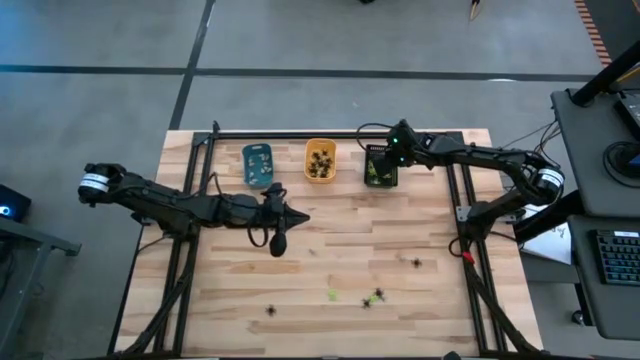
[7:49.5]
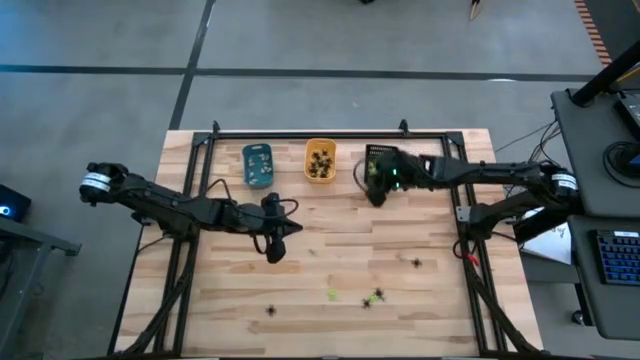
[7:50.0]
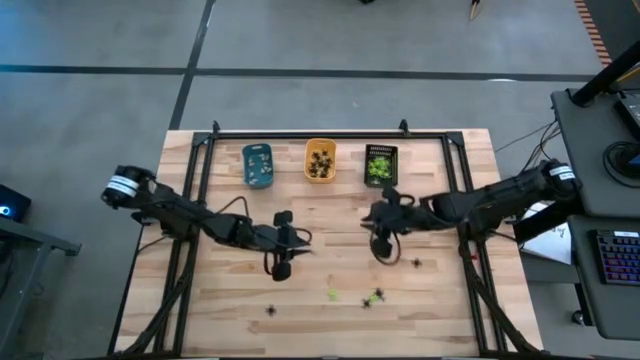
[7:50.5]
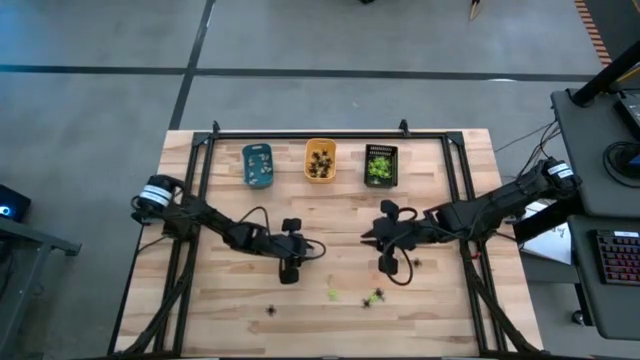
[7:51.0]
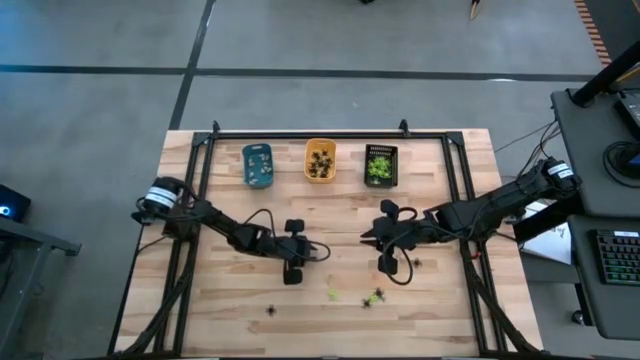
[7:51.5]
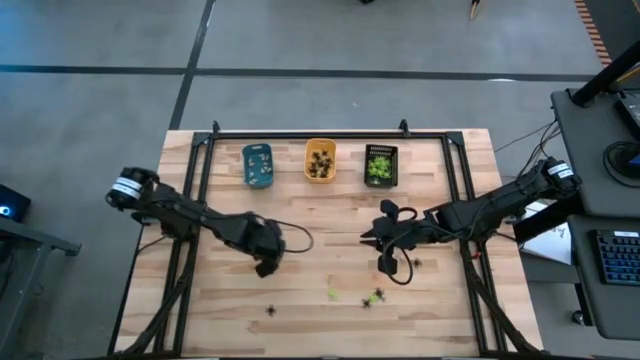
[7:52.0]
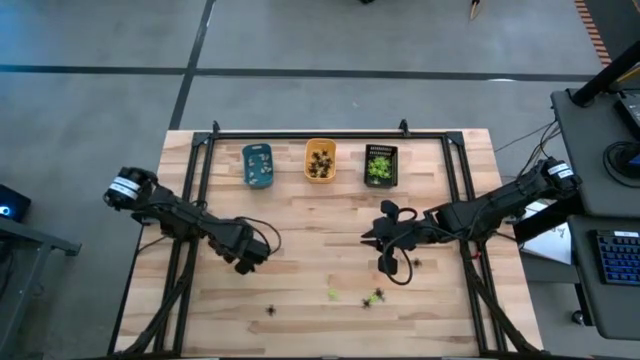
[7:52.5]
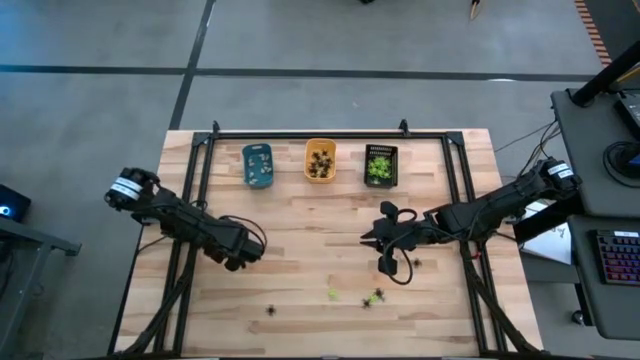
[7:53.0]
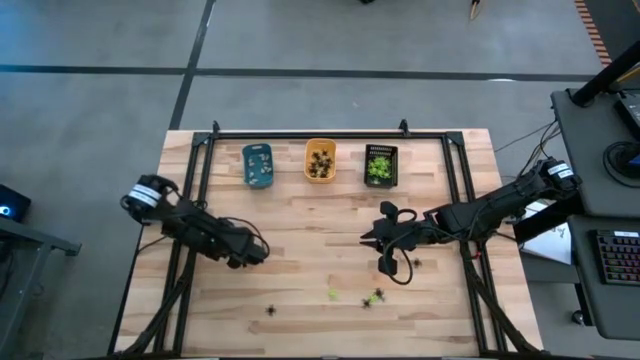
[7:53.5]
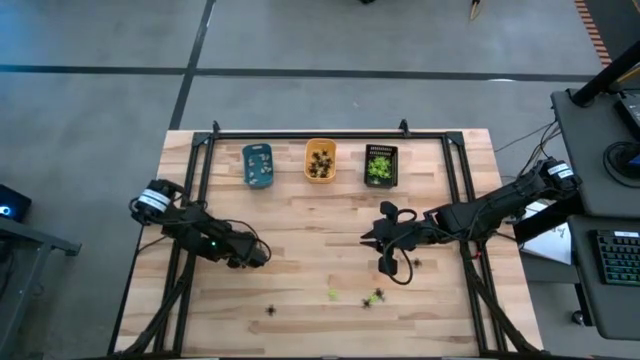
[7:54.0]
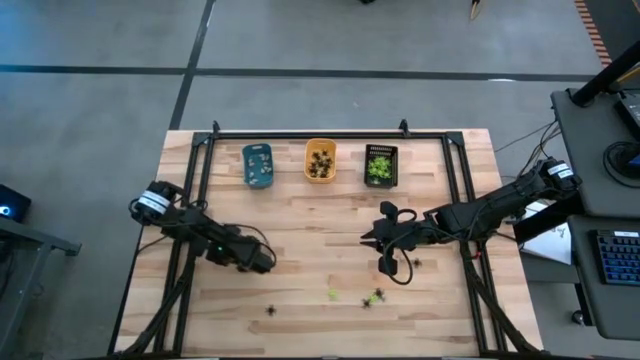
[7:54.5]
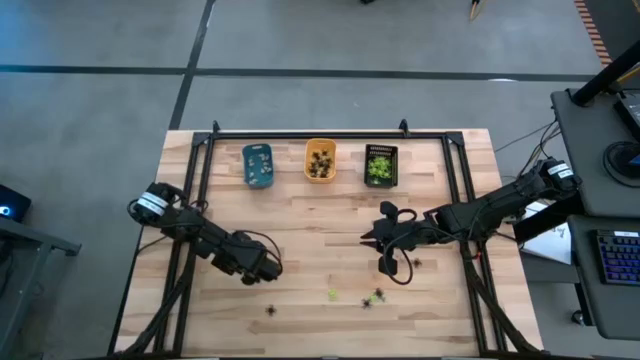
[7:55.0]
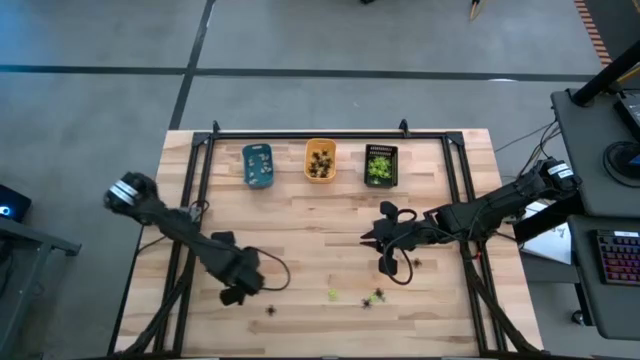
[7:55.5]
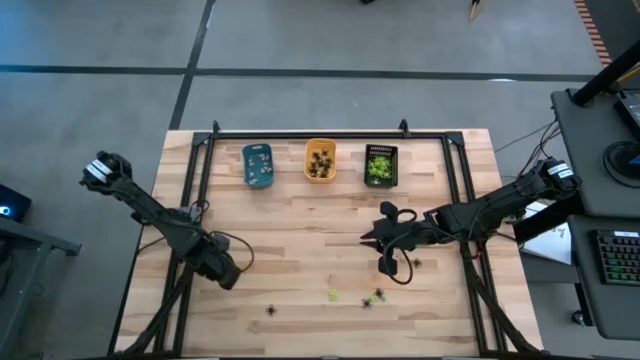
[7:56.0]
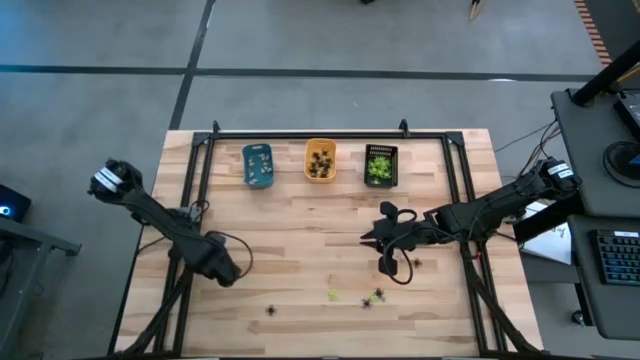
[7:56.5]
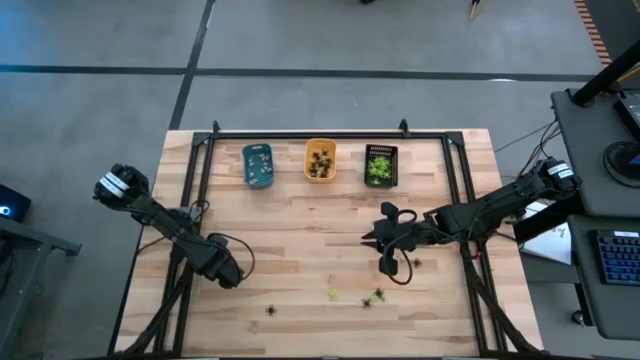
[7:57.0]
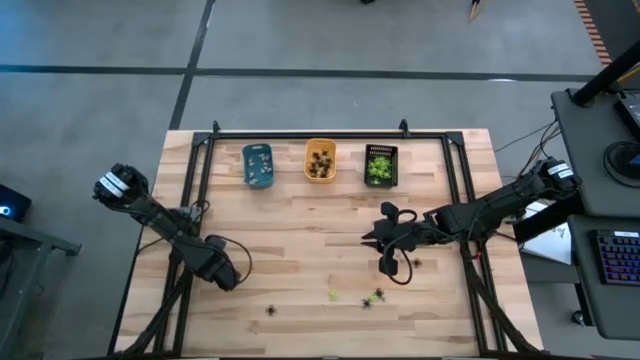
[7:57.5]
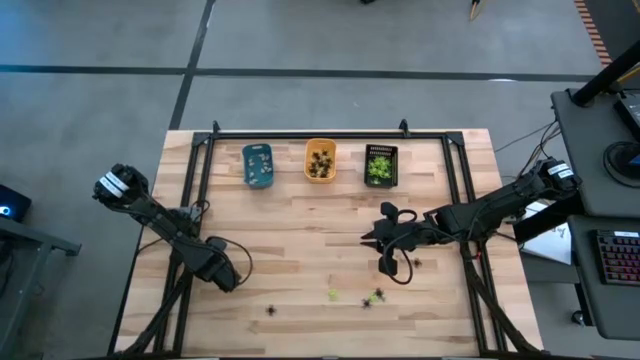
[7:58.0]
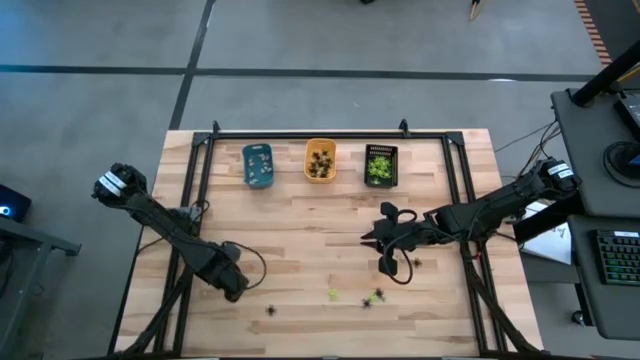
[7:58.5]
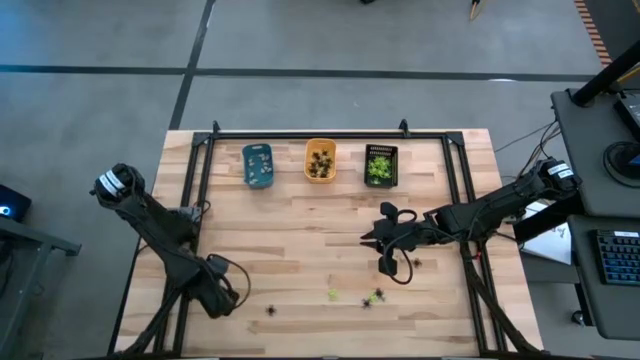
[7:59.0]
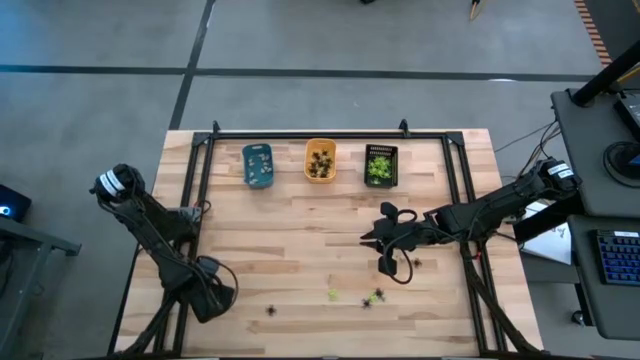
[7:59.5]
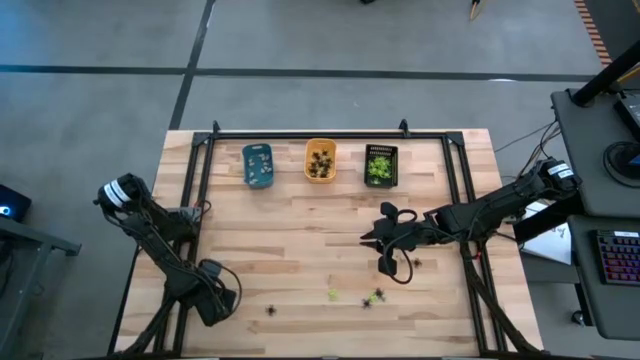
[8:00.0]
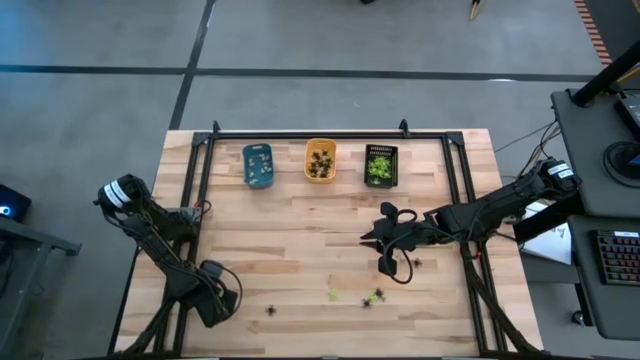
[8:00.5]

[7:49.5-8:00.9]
Task: Sort Halloween decoration
Put the white skull toy into the blue bin

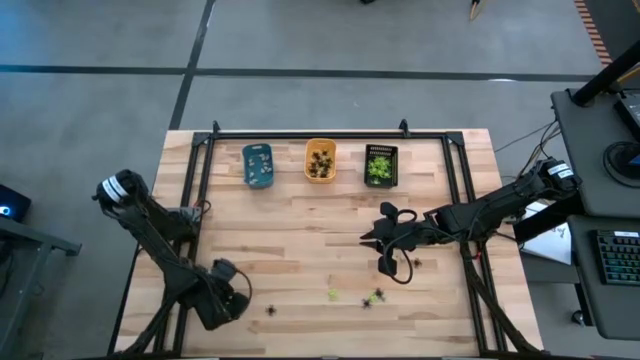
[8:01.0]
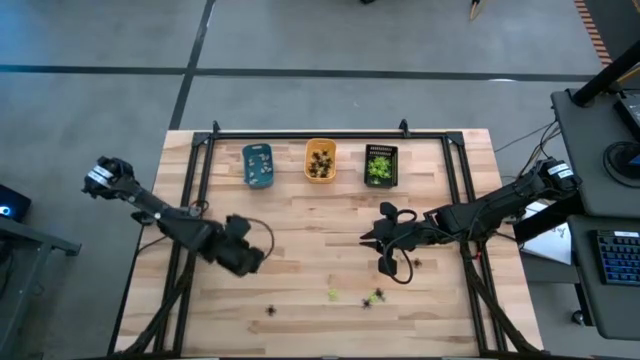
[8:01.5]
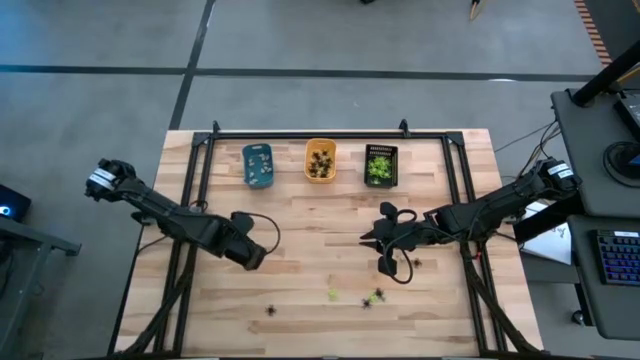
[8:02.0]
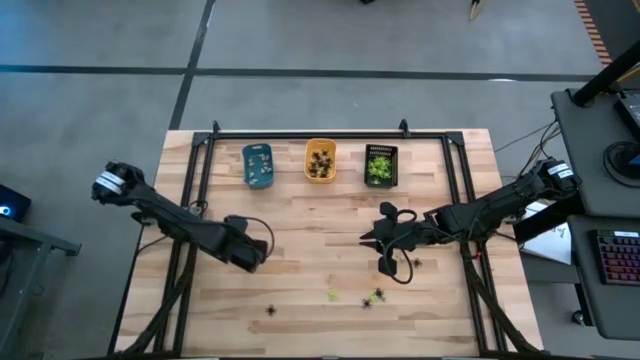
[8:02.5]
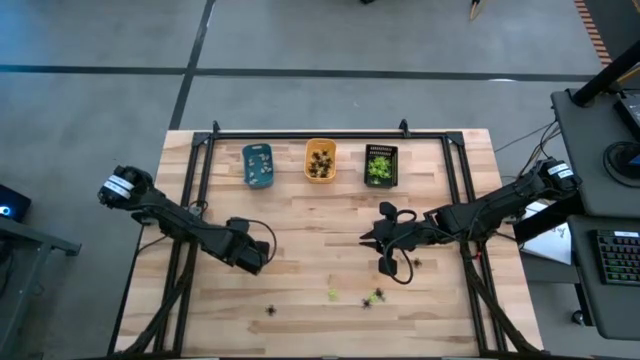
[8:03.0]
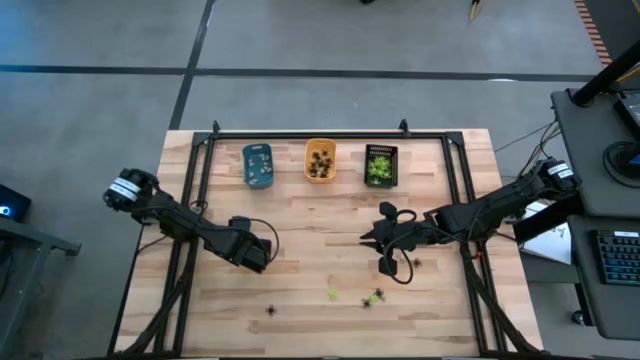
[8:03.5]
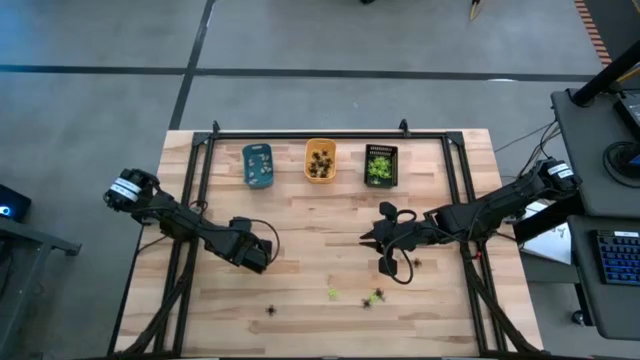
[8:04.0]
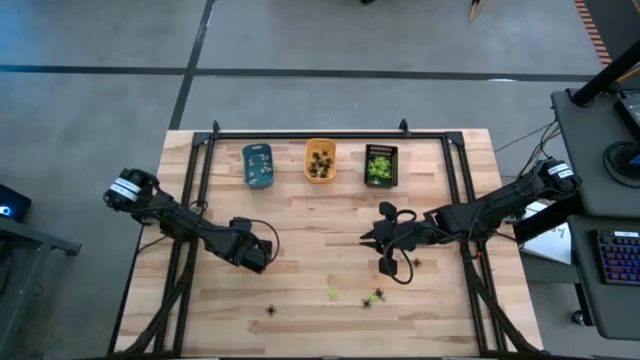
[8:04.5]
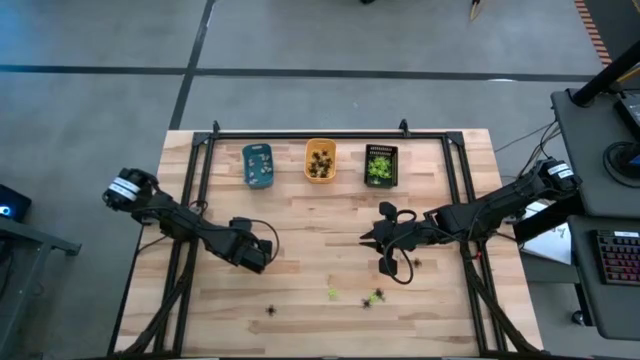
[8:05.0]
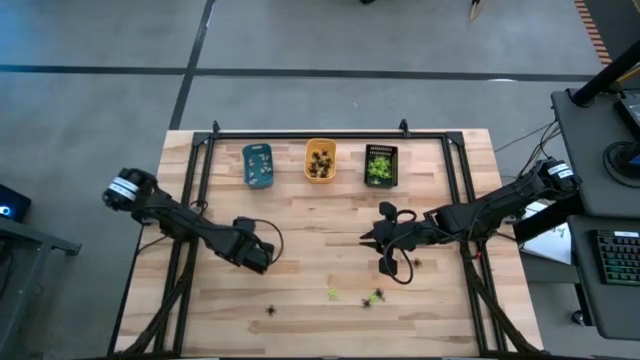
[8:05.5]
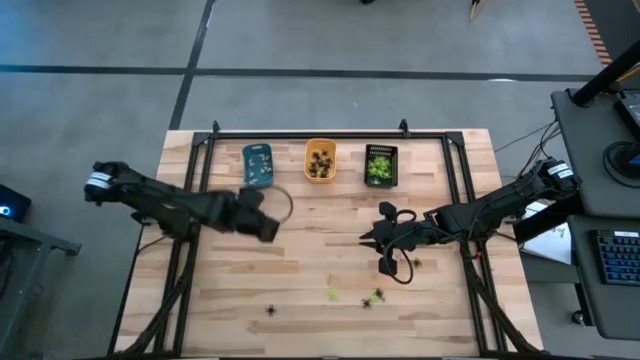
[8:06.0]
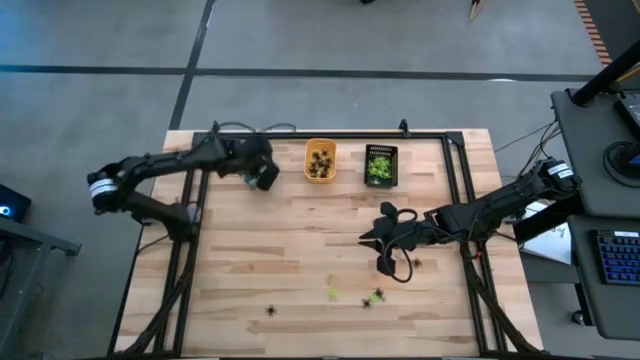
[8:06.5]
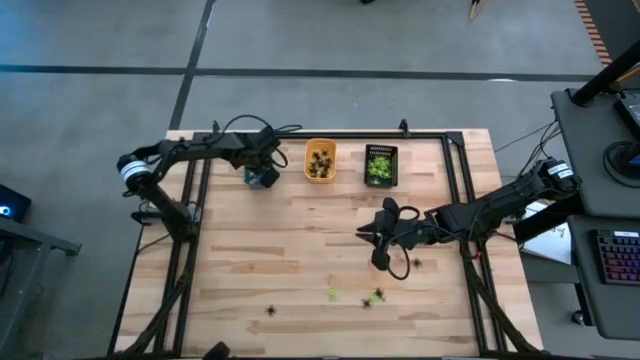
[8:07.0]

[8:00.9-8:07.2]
Put the white skull toy into the blue bin
